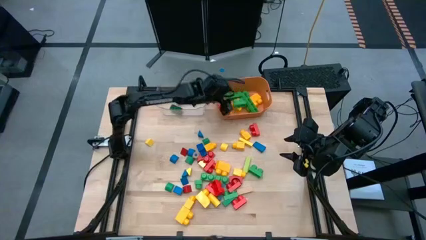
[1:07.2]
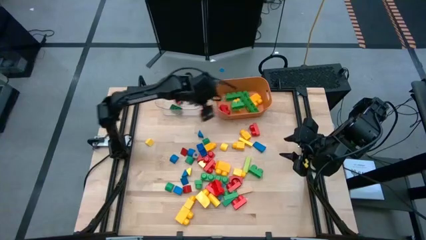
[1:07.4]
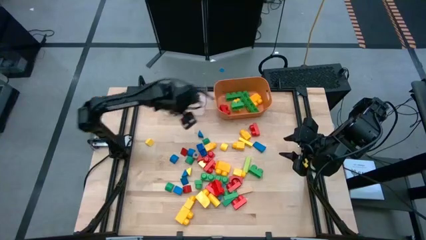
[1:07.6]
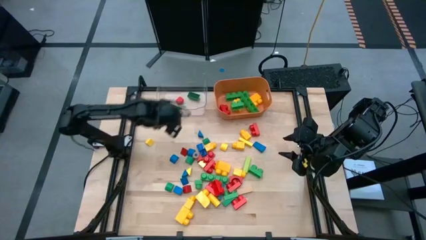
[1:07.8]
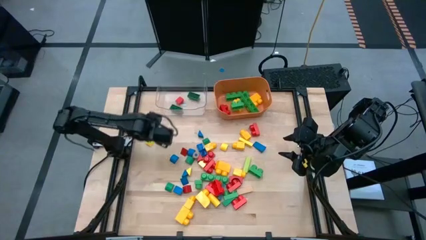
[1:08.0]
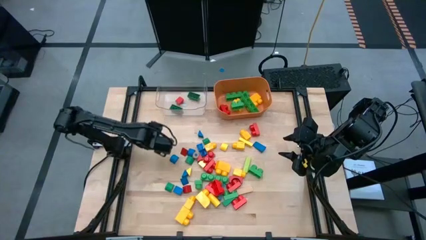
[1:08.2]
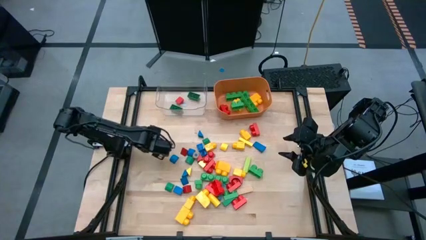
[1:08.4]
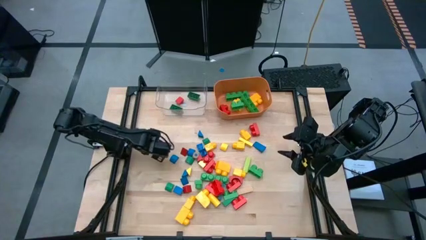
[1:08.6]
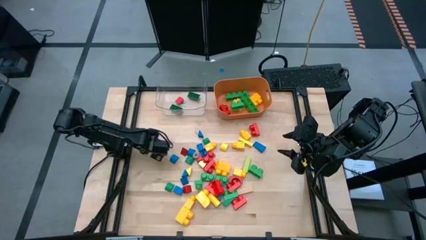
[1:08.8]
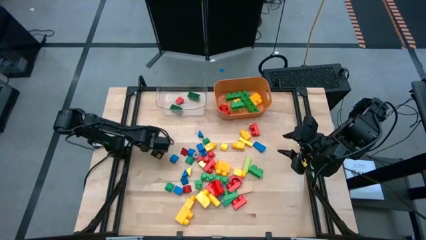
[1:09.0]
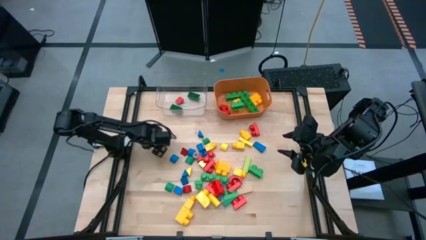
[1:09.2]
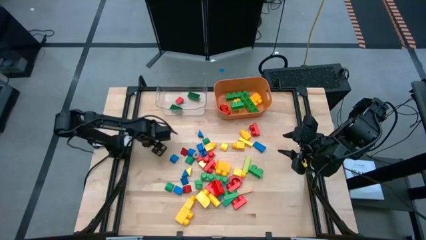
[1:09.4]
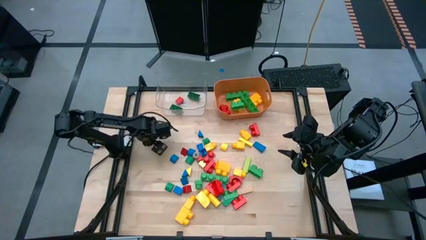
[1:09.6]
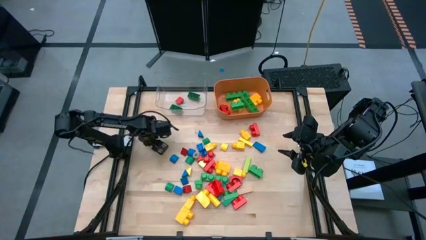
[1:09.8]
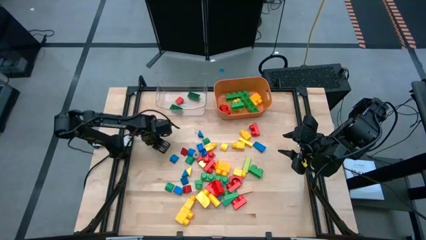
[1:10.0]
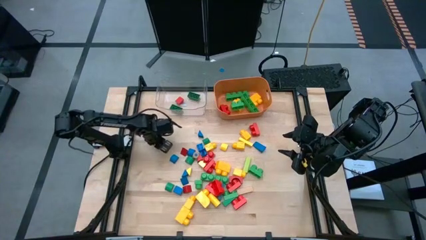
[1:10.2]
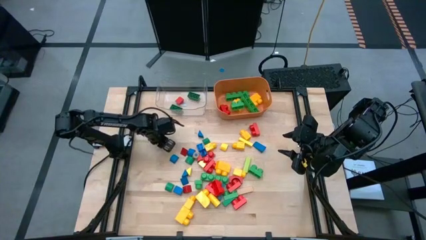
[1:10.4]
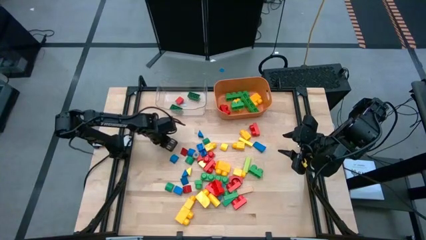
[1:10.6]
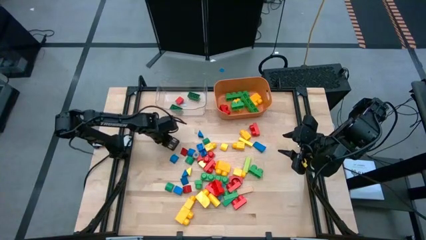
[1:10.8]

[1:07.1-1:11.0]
Task: Sort blocks by size
Put the small yellow block into the transparent bin

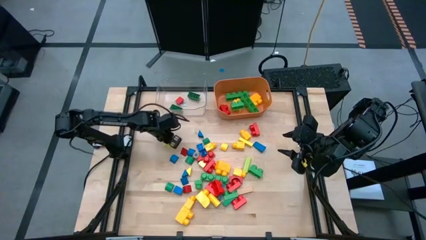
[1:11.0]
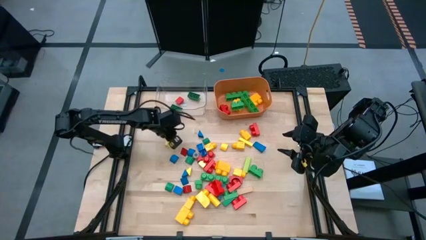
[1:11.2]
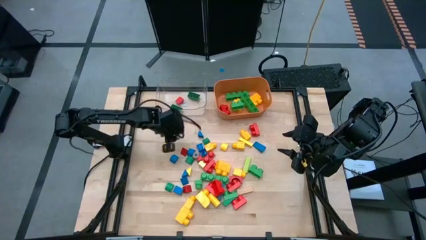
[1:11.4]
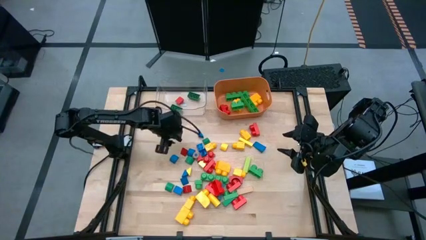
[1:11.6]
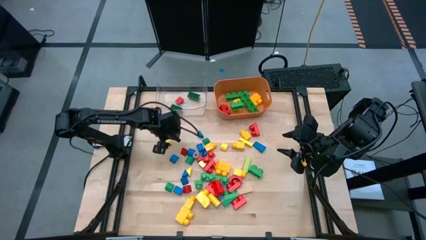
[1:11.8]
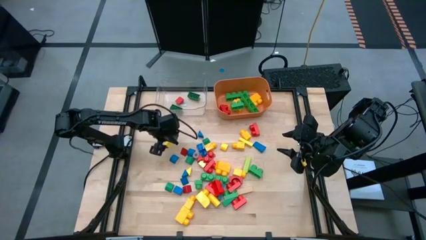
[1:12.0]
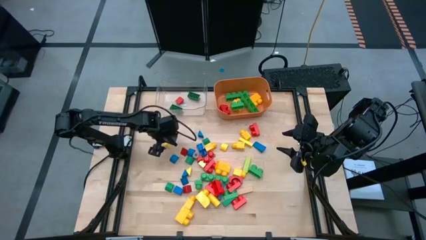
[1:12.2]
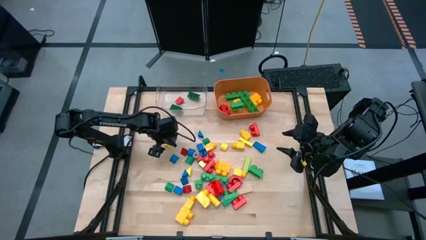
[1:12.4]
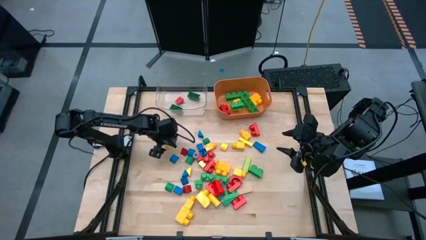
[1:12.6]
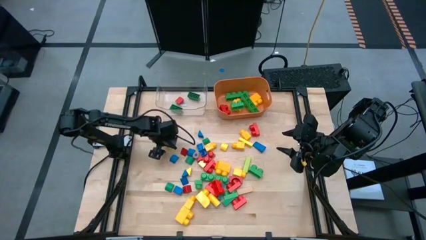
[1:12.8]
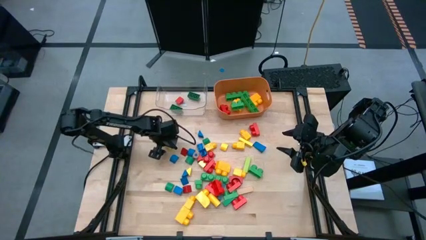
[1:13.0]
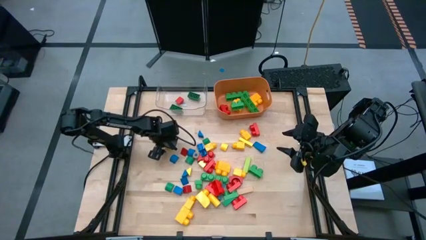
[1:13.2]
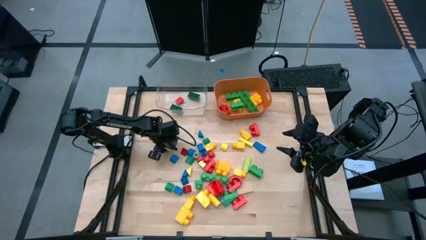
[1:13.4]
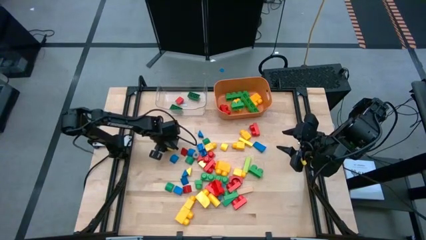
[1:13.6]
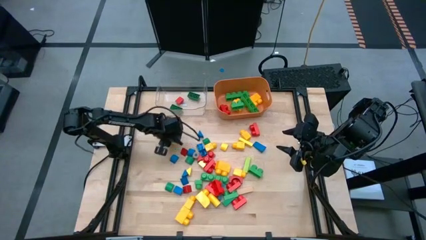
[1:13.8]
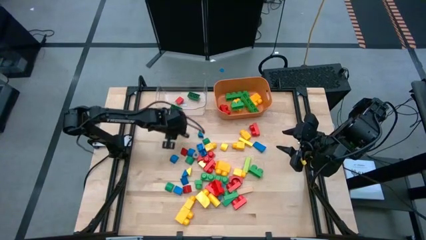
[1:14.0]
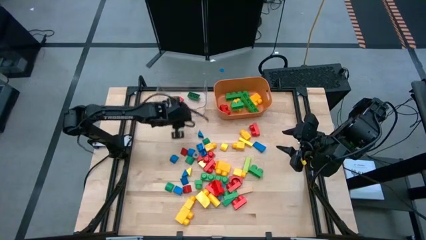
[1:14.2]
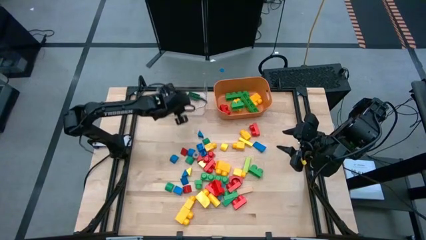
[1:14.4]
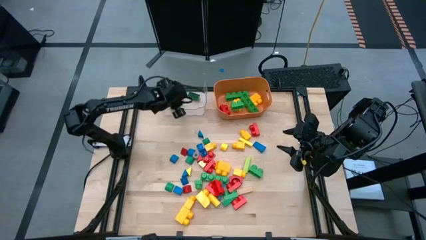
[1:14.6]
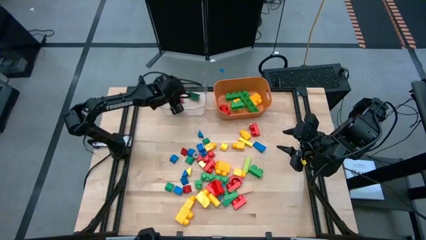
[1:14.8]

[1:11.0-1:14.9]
Put the small yellow block into the transparent bin

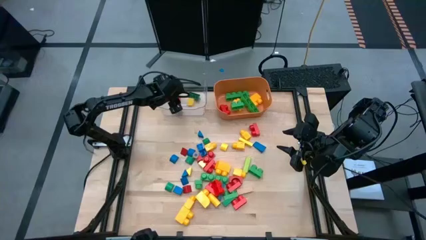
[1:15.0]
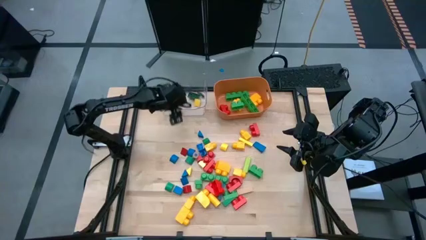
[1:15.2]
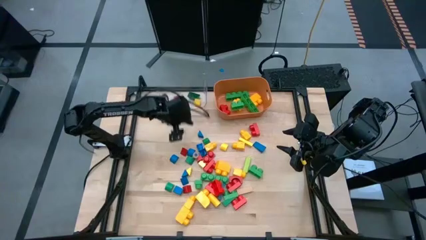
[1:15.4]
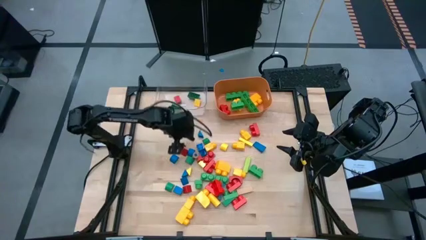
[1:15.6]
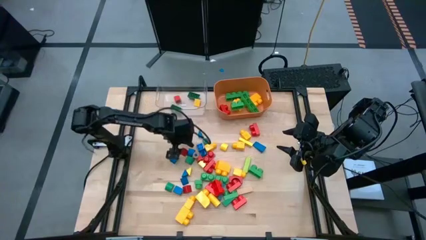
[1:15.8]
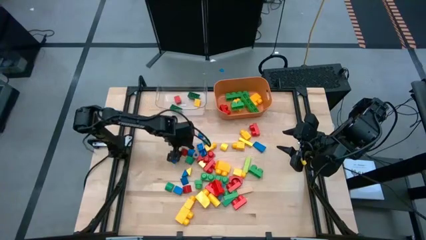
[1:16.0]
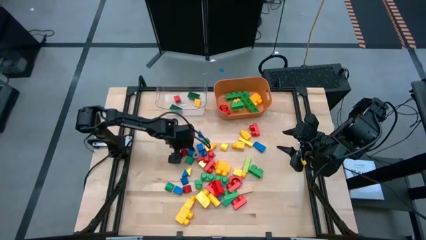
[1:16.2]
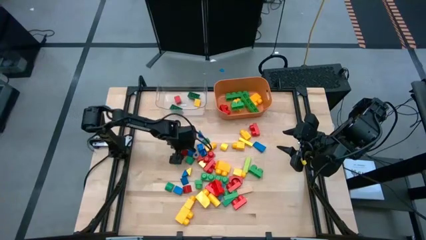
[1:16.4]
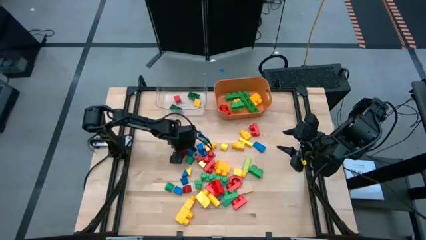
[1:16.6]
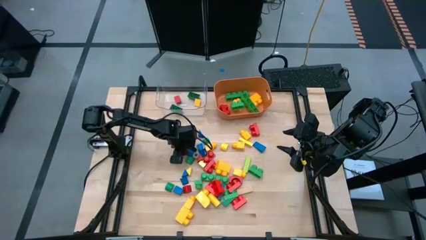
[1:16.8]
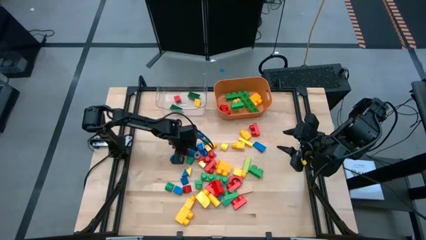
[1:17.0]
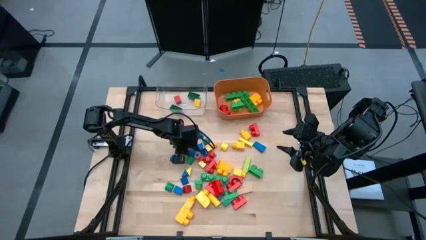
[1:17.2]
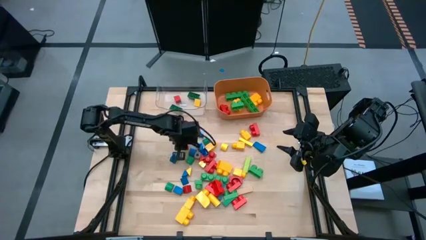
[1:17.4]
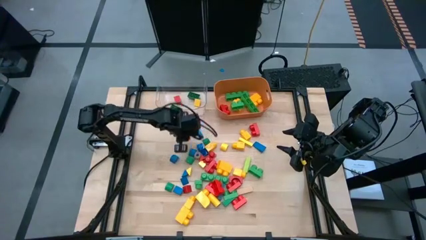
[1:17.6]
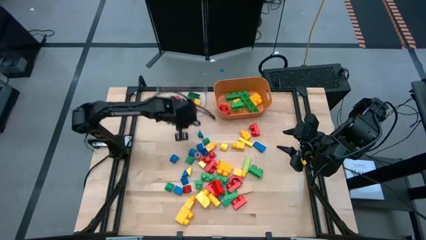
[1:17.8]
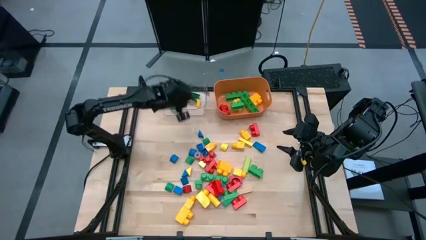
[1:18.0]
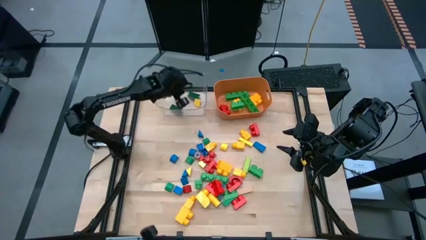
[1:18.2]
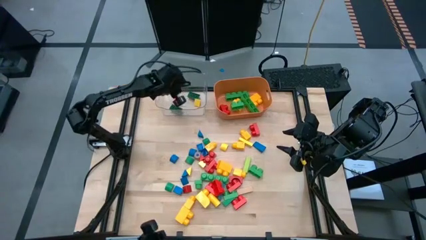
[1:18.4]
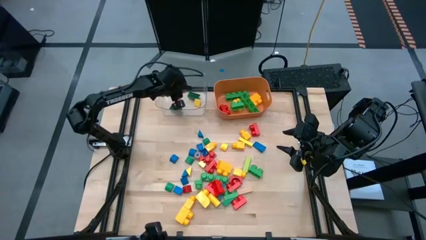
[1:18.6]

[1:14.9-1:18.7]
Put the small red block into the transparent bin

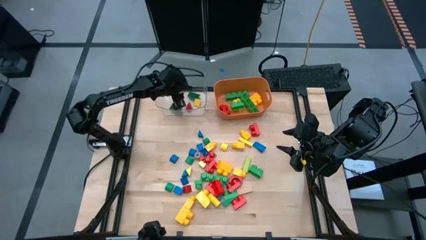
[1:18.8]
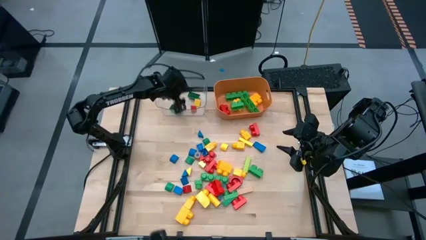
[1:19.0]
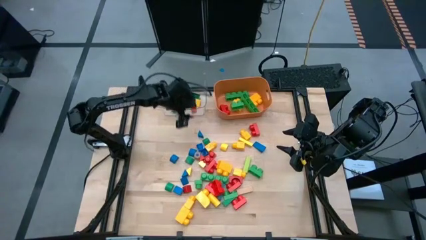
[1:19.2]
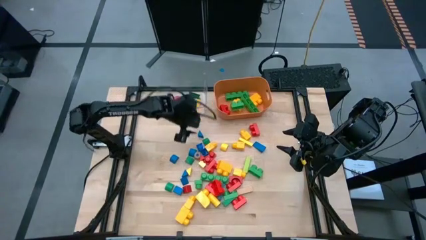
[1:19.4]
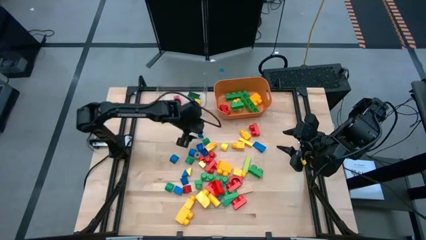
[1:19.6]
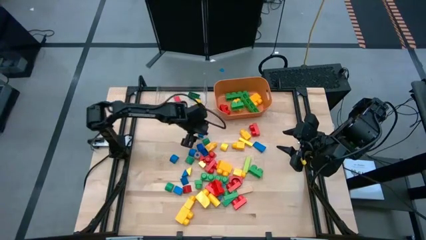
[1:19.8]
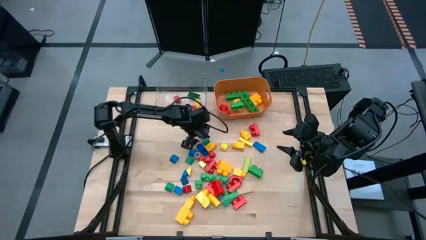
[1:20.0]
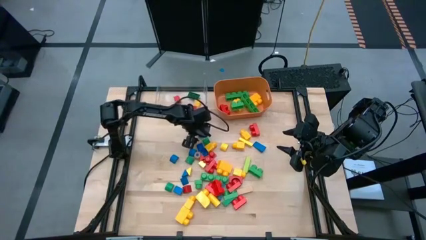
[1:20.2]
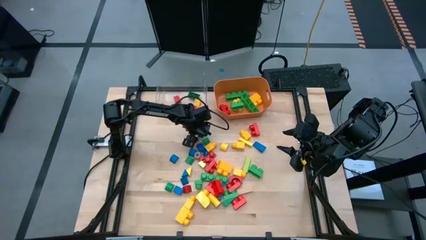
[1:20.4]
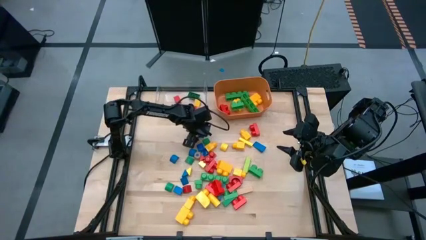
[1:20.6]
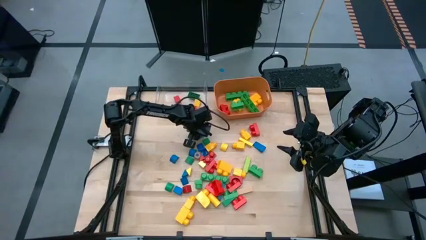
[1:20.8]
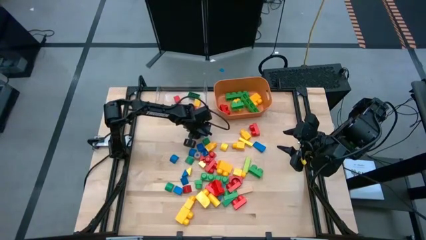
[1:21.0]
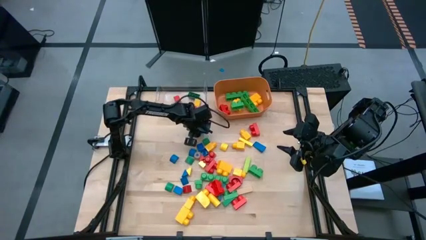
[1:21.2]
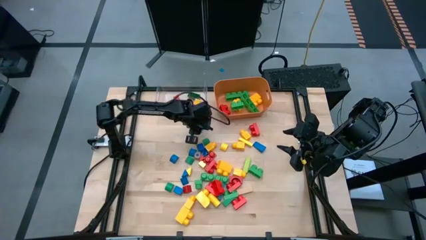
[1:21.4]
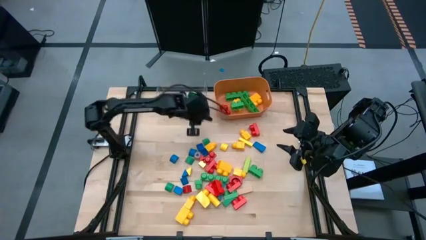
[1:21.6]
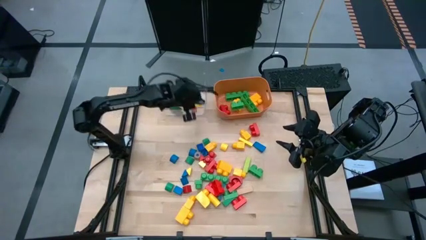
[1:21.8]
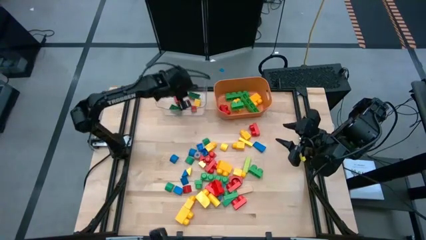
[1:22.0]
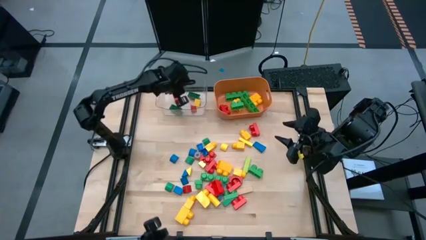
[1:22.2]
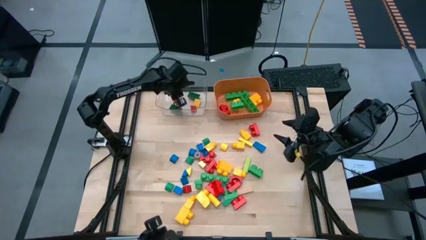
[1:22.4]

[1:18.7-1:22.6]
Put the small blue block into the transparent bin

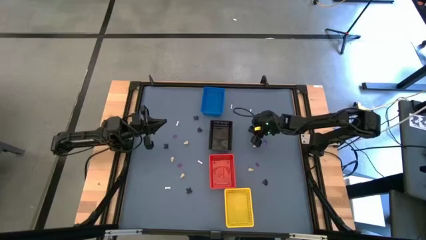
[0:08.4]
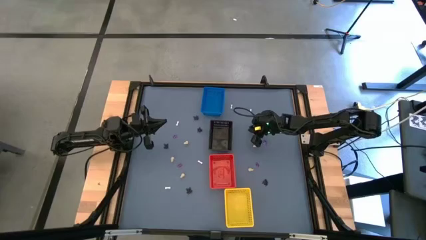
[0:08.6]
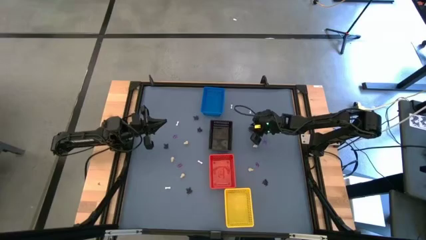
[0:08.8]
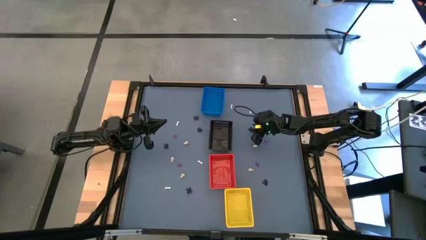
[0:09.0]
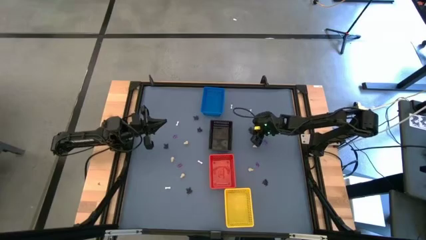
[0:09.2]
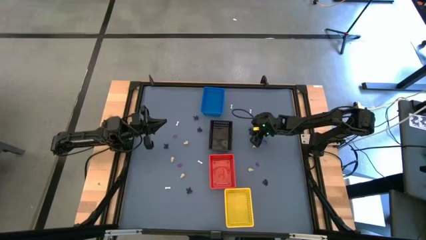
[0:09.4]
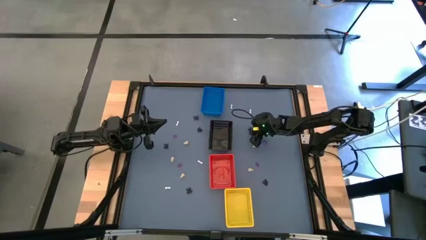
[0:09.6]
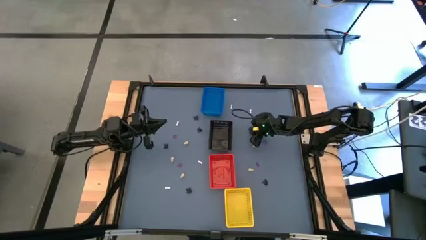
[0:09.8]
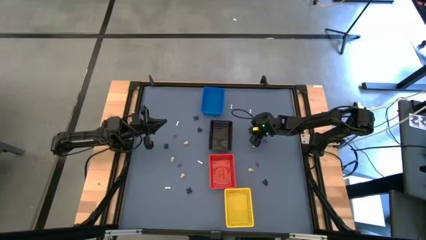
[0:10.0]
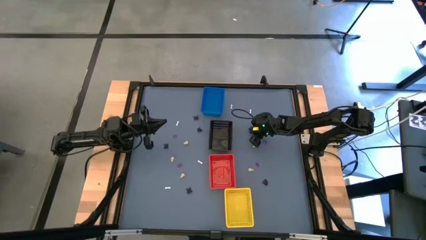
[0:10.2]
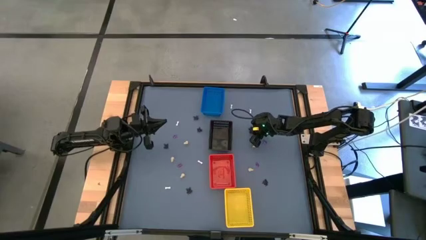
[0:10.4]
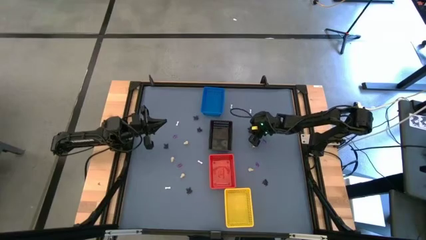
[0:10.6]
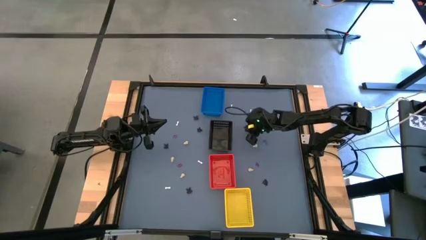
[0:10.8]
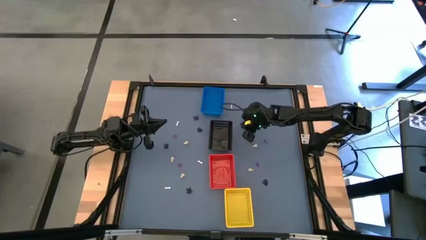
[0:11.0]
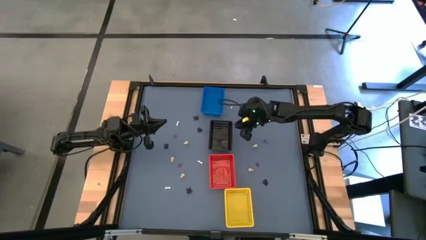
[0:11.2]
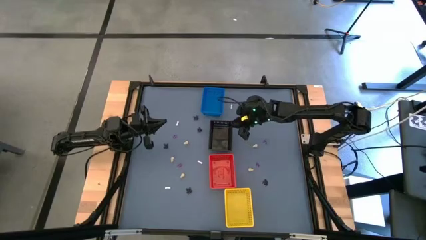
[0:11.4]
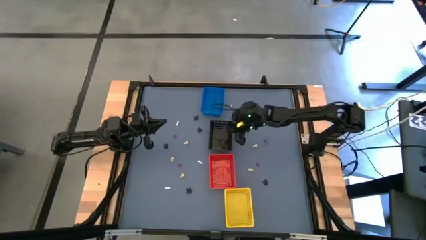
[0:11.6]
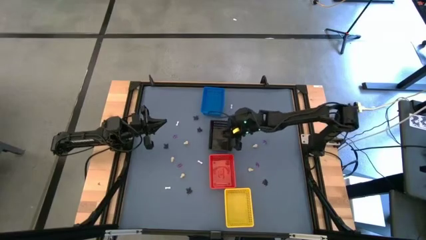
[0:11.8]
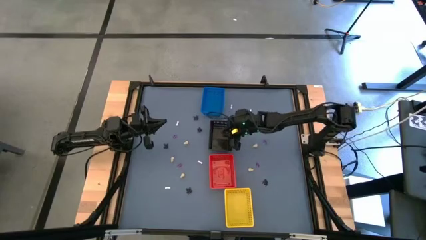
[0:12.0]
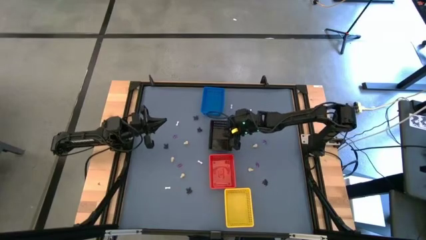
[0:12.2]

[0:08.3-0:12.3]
Task: Sort Halloween decoration
Put the black spider toy into the black bin
